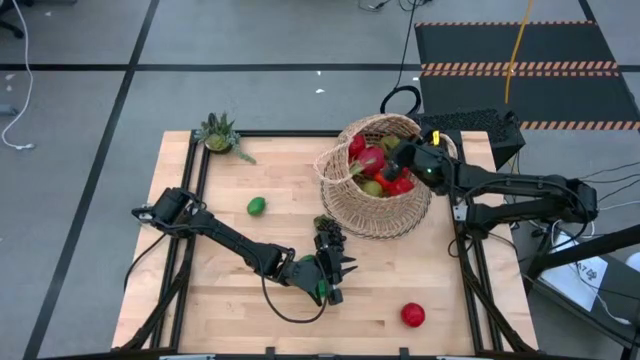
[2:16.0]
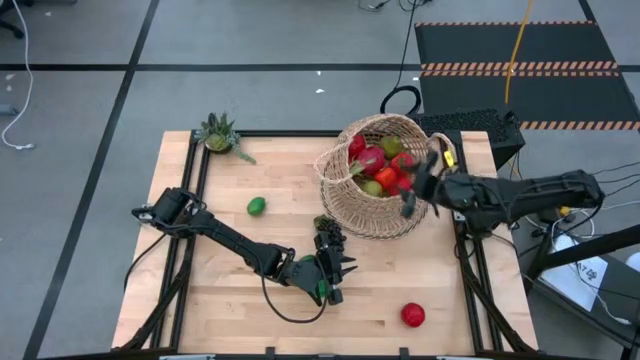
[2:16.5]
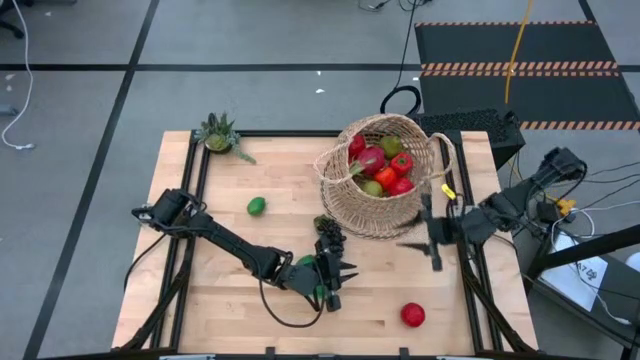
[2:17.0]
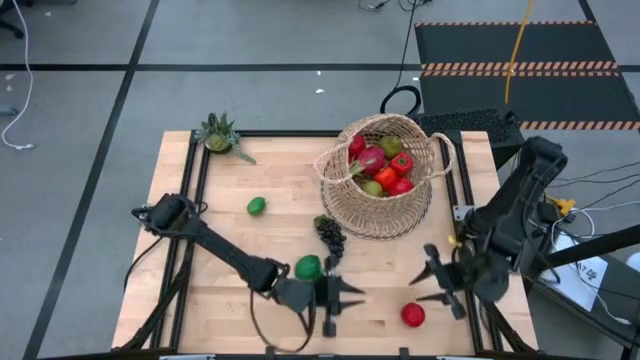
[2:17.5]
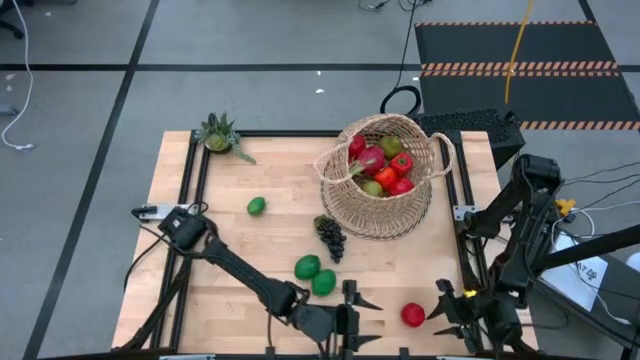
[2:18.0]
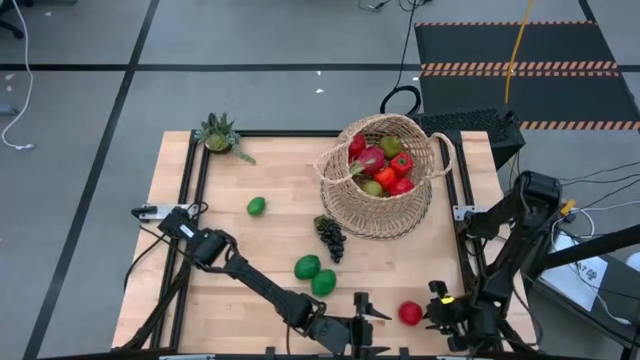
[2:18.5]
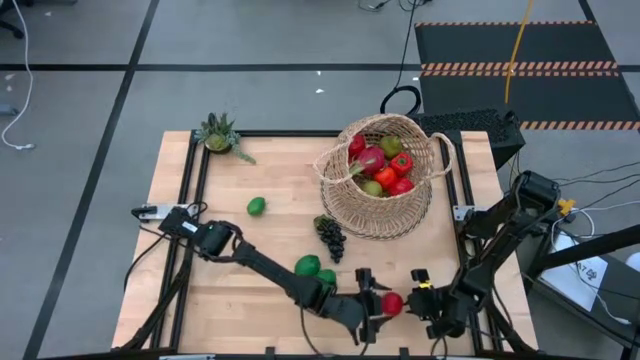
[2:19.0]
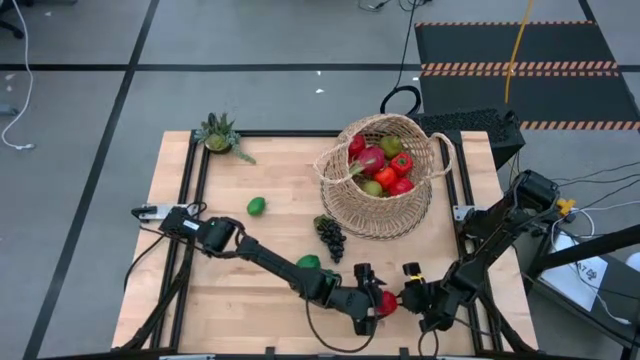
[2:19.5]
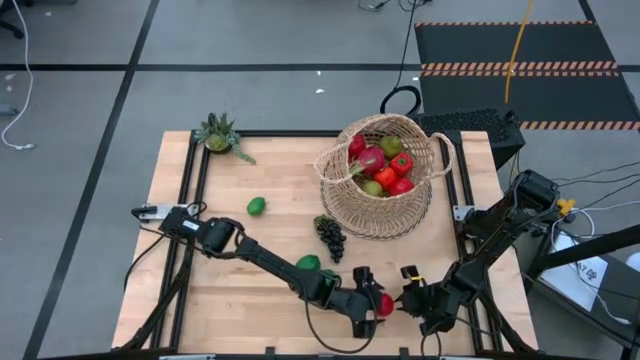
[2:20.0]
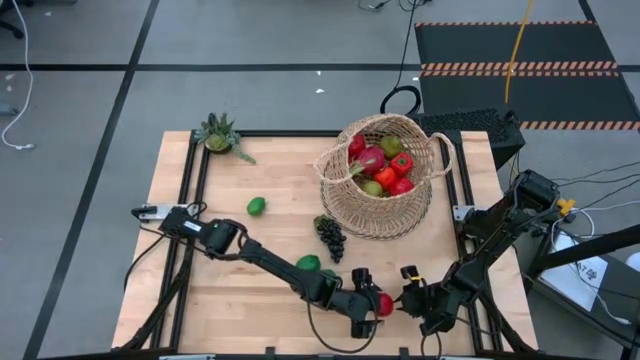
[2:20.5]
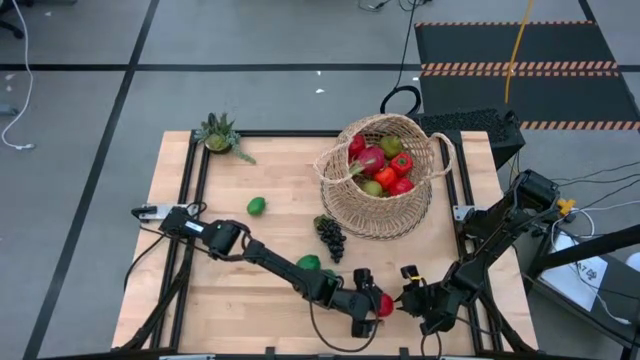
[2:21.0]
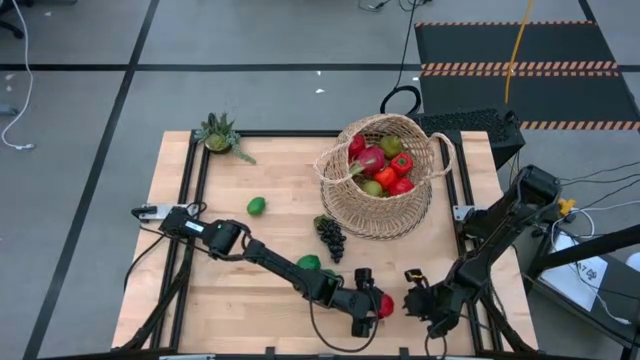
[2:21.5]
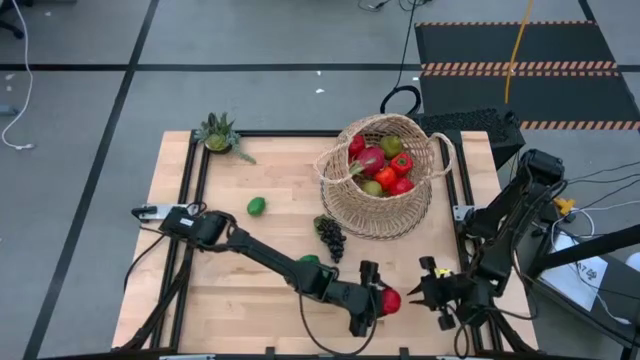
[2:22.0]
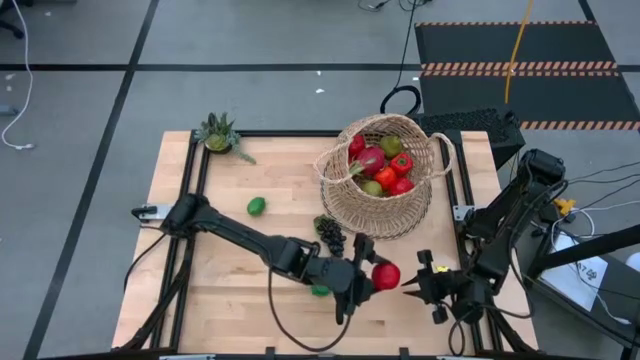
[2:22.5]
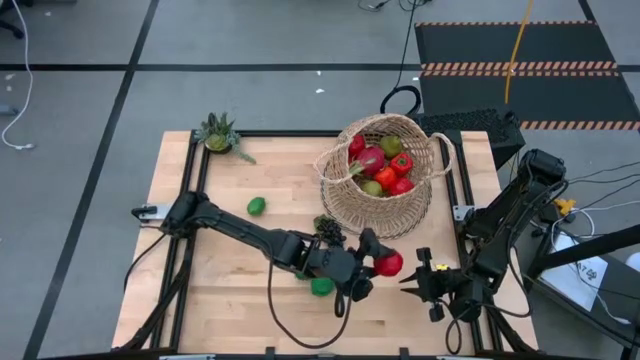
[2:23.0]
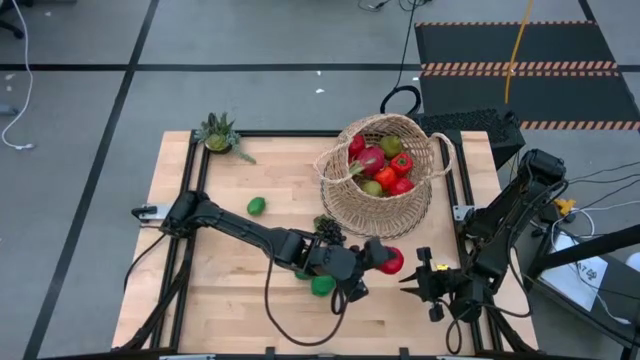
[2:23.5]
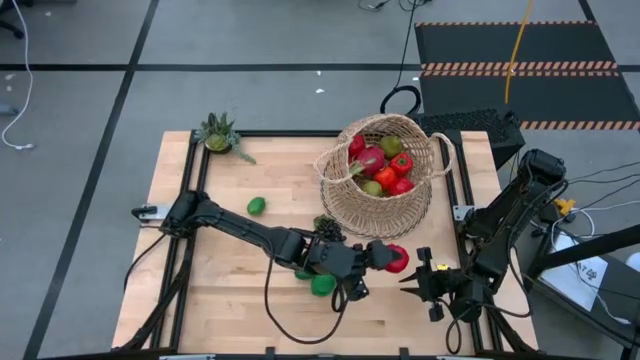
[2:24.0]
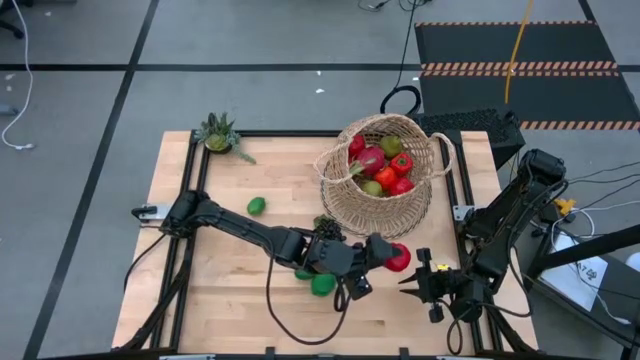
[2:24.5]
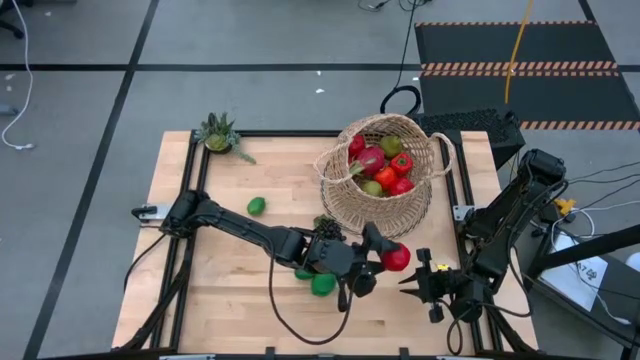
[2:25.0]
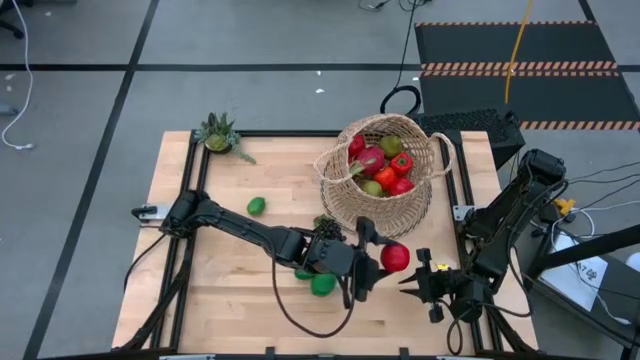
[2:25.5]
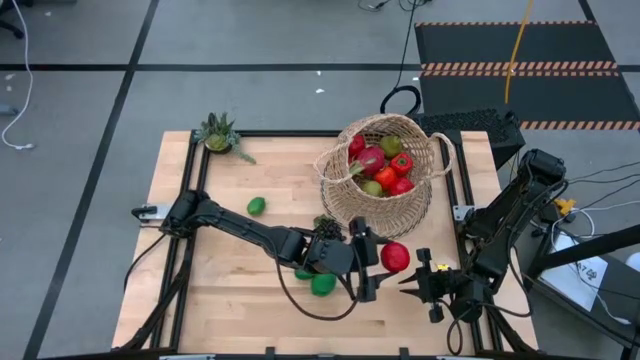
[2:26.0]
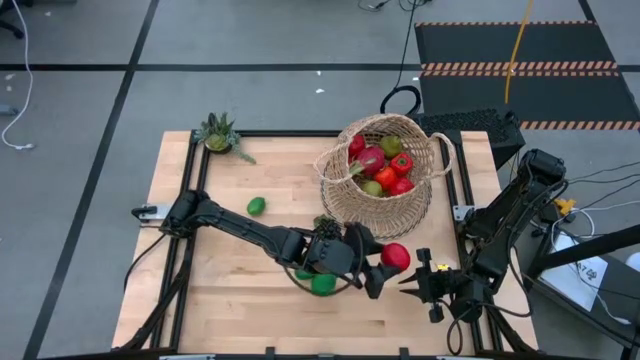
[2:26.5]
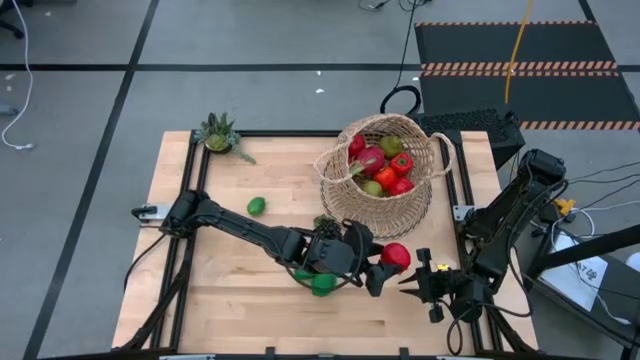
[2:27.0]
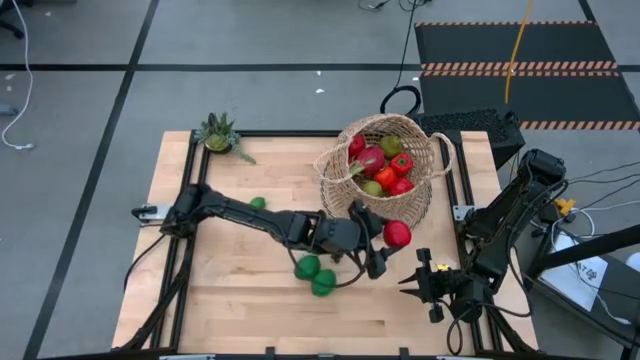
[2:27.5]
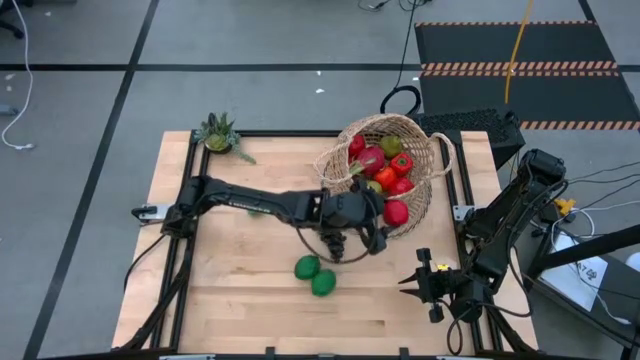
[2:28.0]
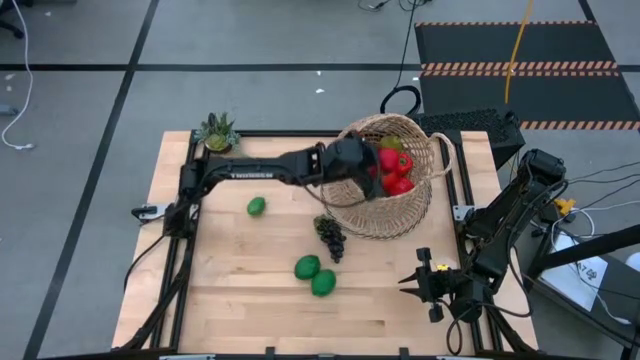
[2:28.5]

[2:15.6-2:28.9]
Task: Build produce basket
Put the red tomato into the brown basket

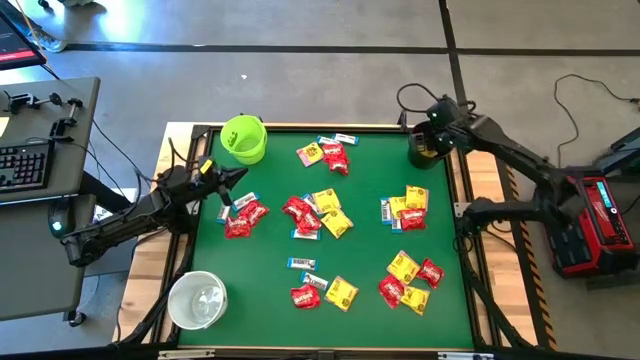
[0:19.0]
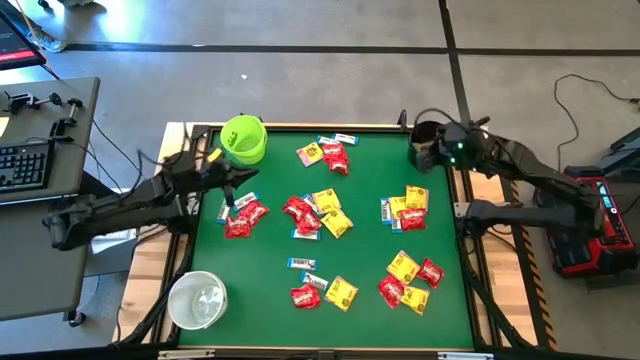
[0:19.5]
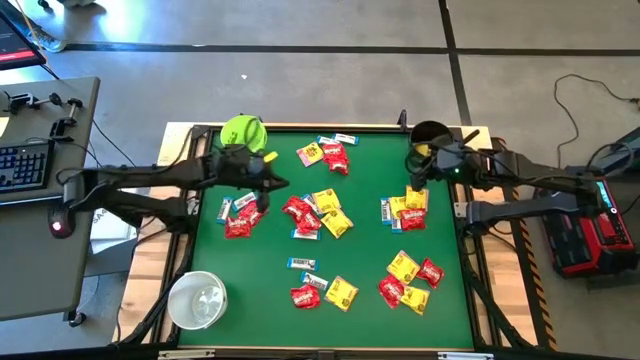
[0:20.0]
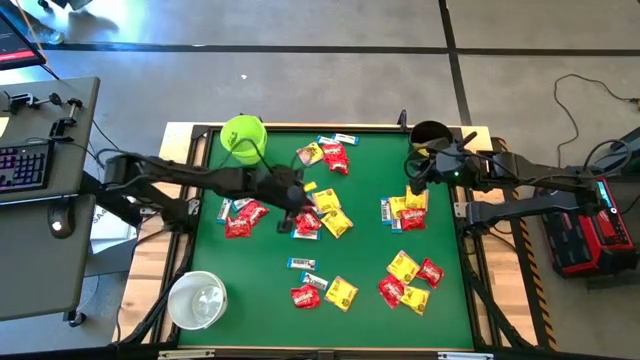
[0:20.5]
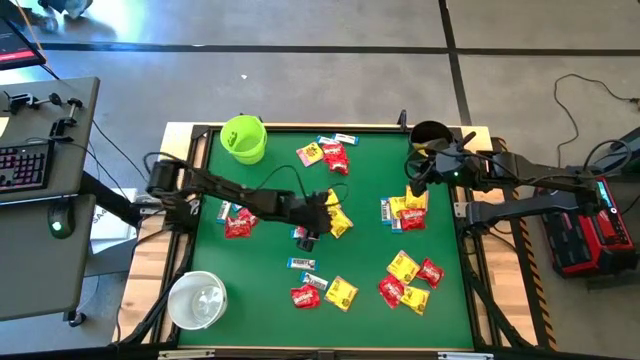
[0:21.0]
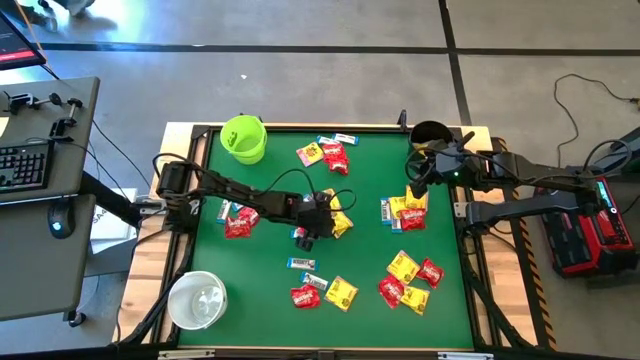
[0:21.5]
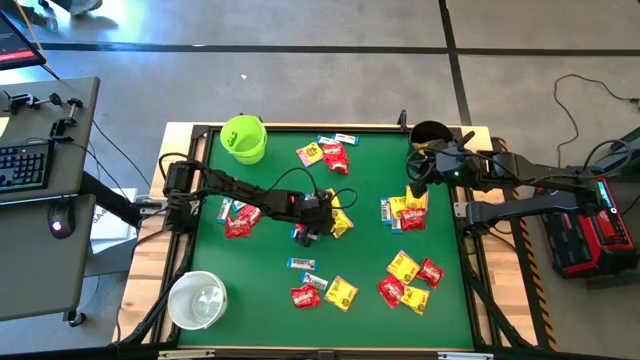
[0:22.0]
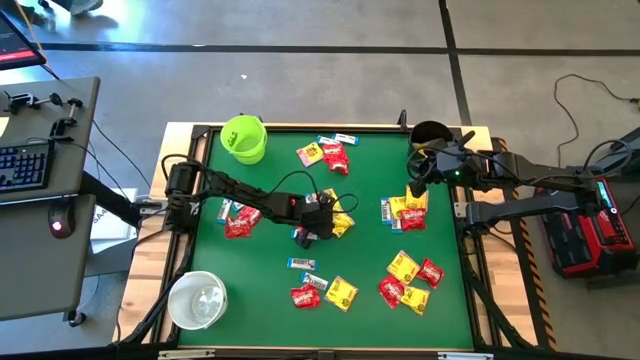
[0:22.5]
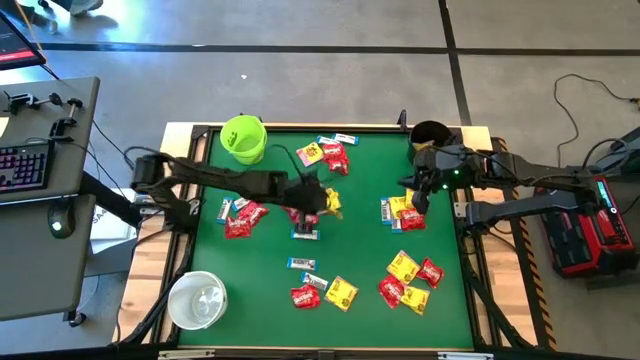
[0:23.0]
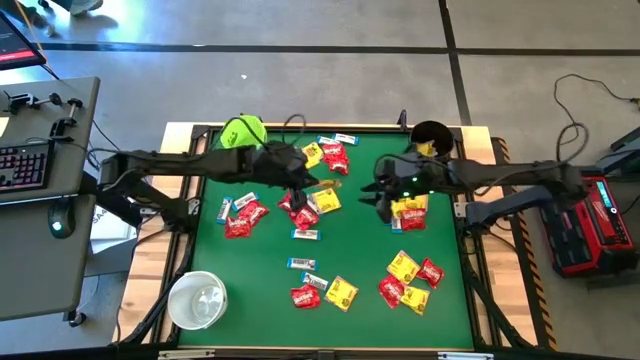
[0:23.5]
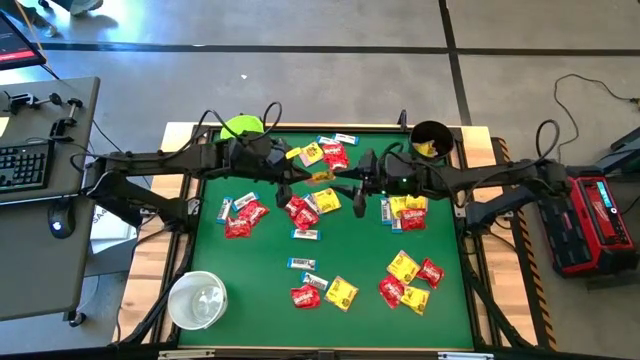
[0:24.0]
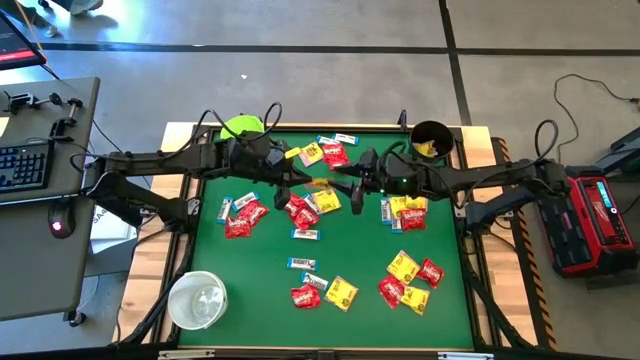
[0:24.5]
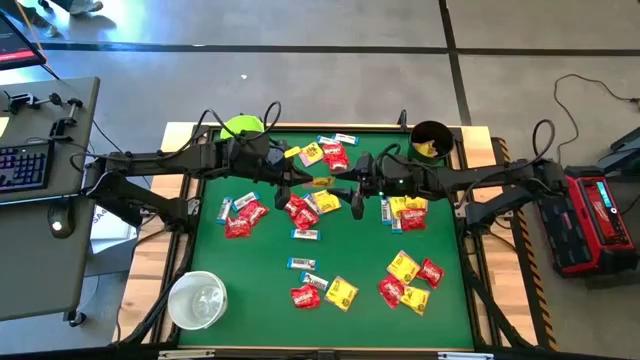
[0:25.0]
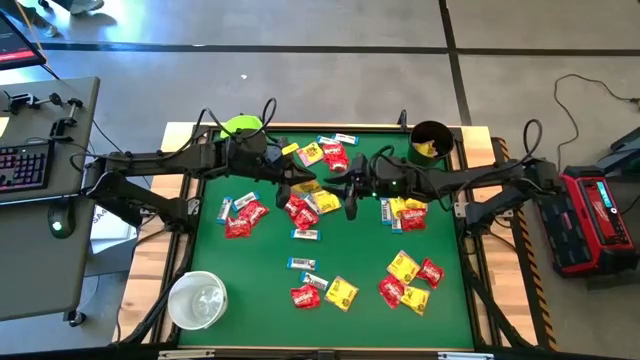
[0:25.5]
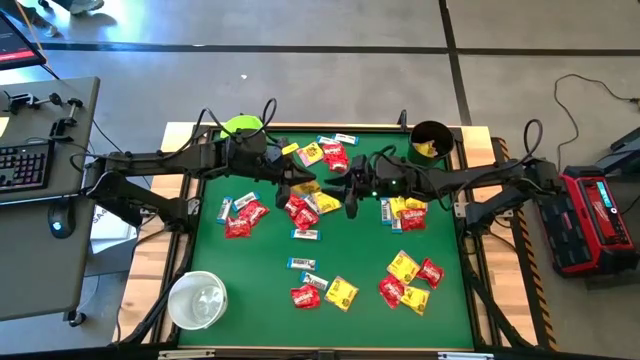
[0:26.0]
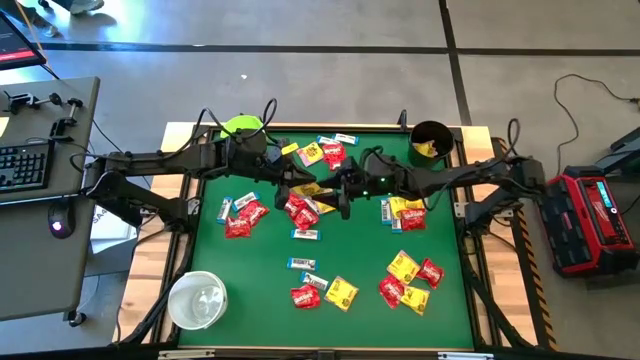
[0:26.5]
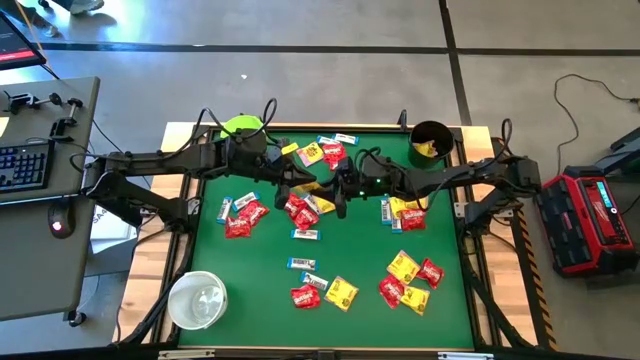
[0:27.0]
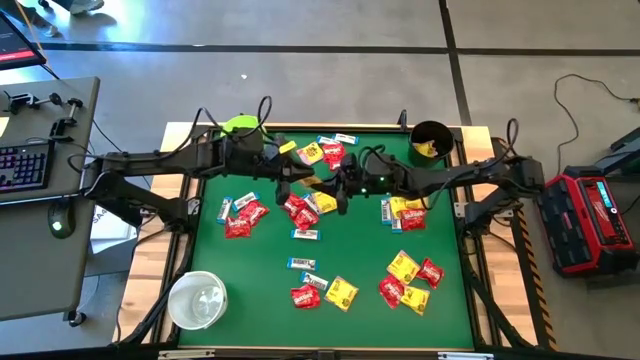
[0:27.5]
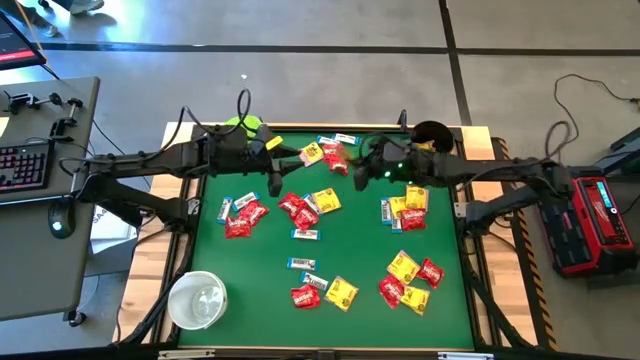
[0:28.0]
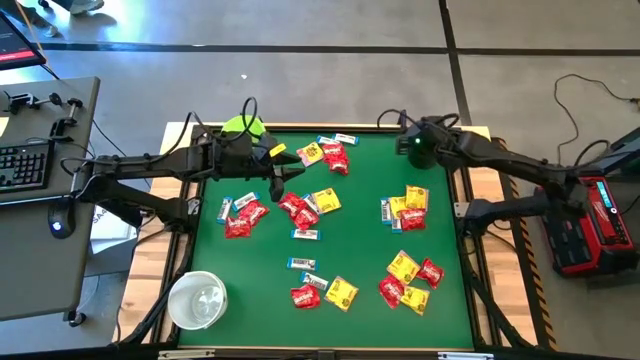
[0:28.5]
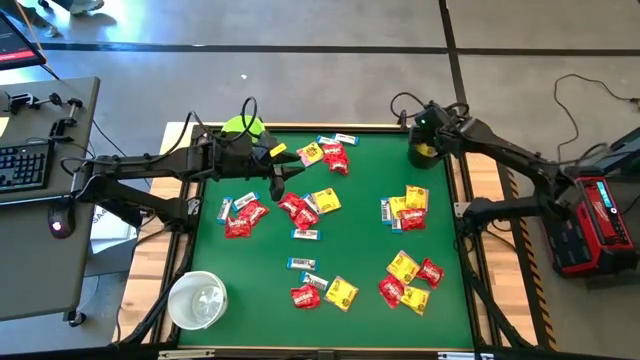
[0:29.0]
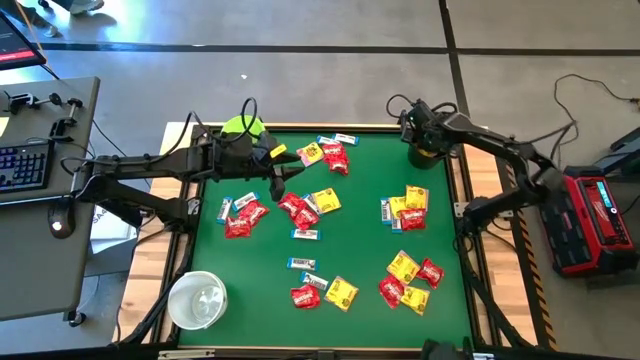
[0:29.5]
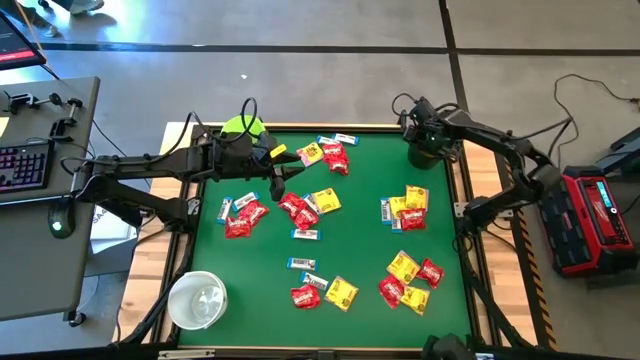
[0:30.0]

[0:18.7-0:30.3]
Task: Sort candy by brand, put in halloween buckets
Put the yellow candy into the black bucket
